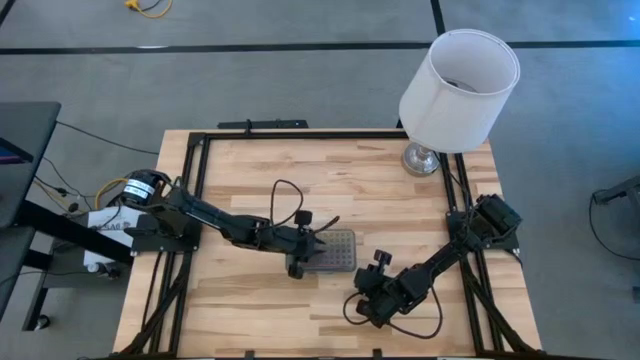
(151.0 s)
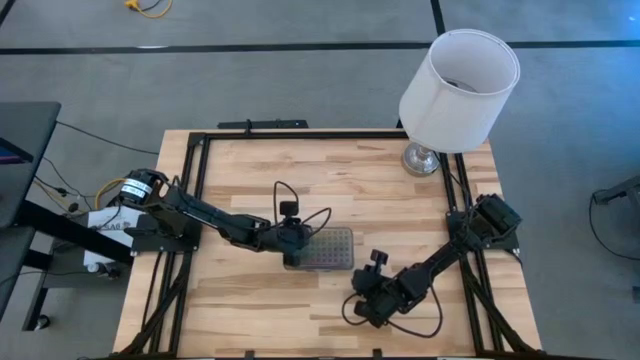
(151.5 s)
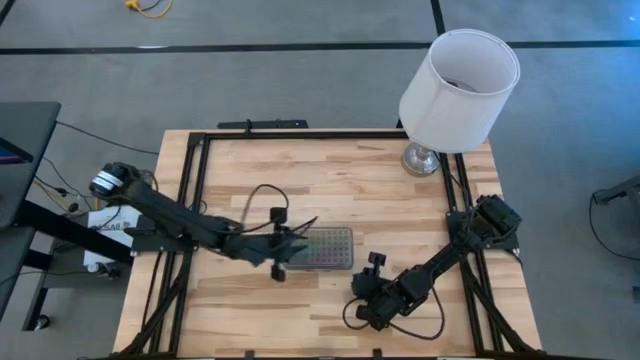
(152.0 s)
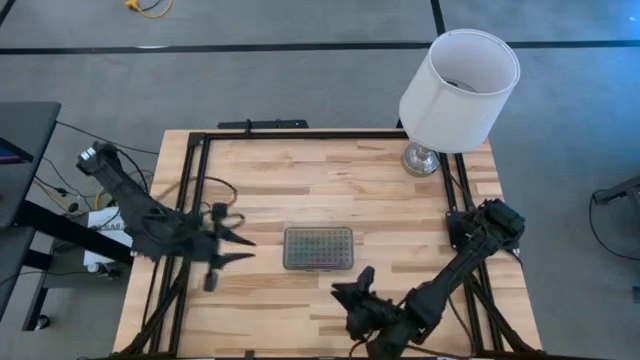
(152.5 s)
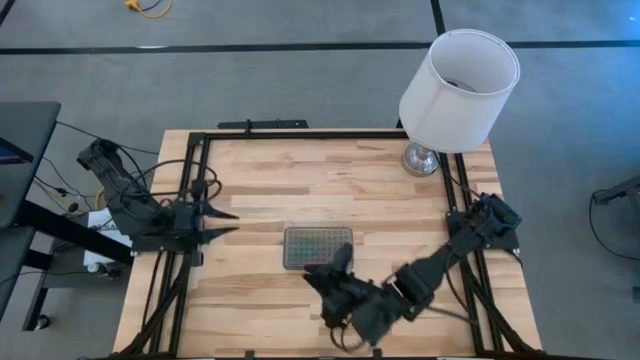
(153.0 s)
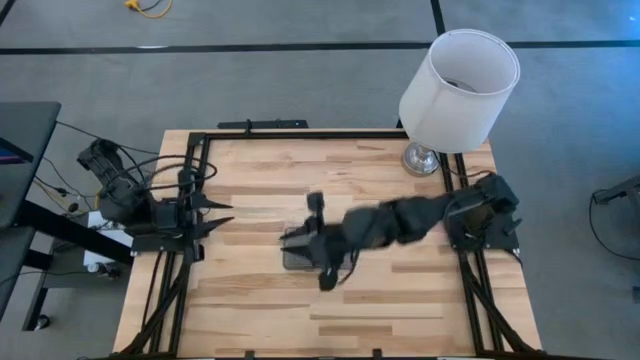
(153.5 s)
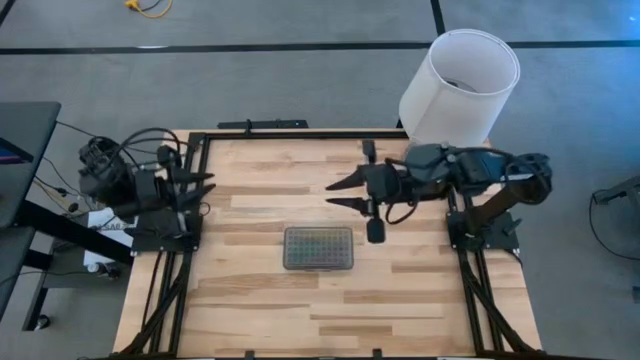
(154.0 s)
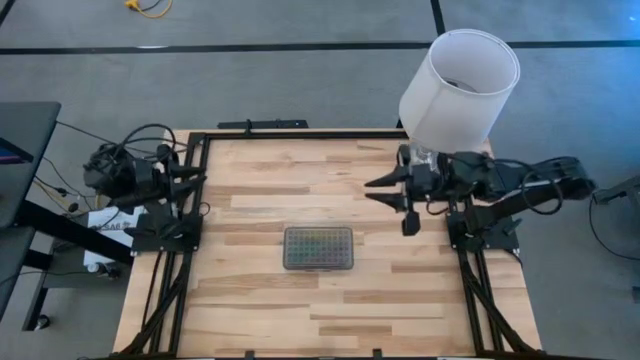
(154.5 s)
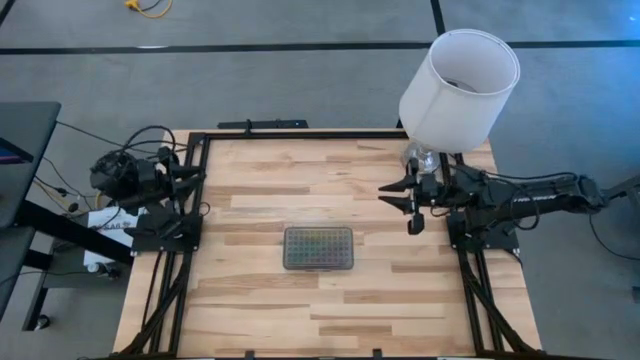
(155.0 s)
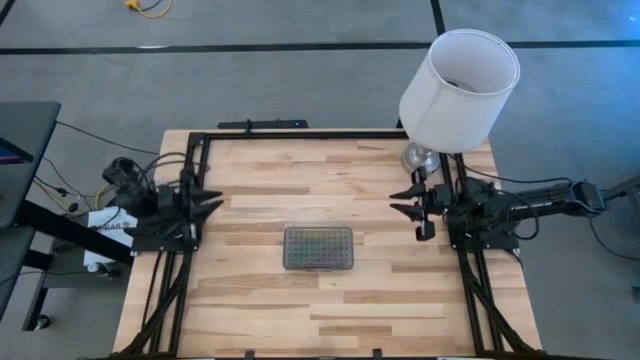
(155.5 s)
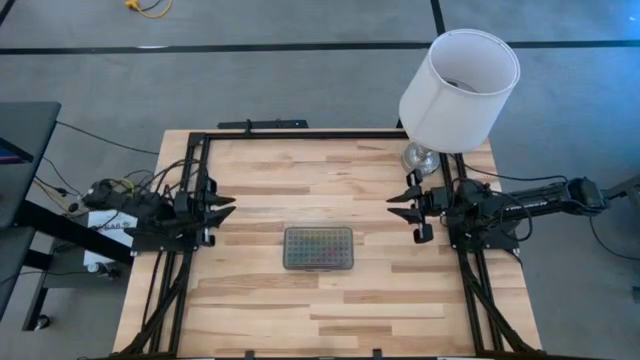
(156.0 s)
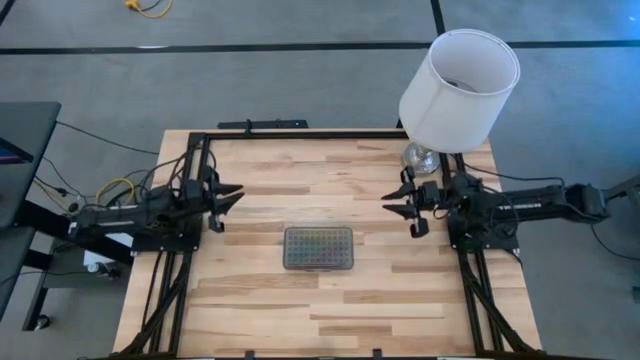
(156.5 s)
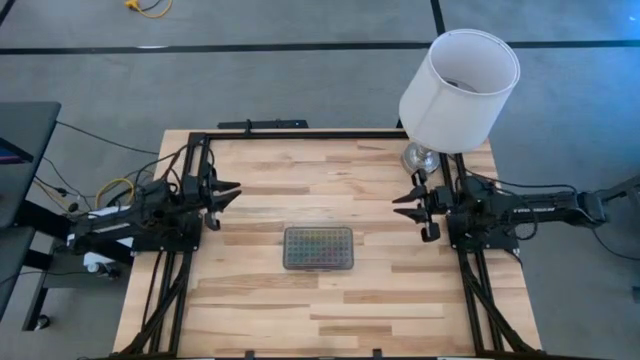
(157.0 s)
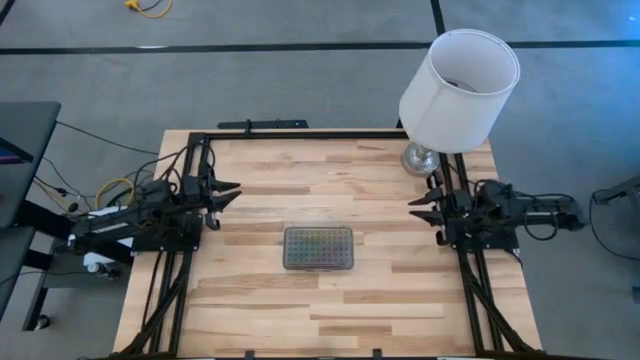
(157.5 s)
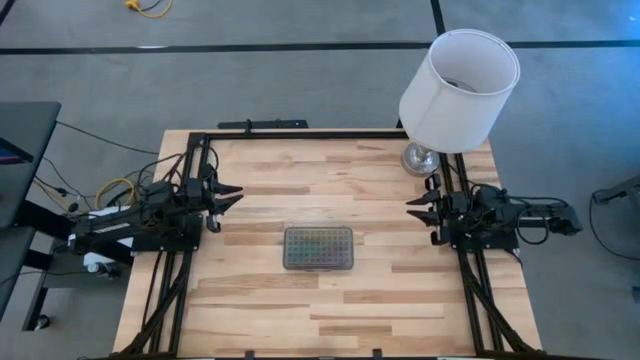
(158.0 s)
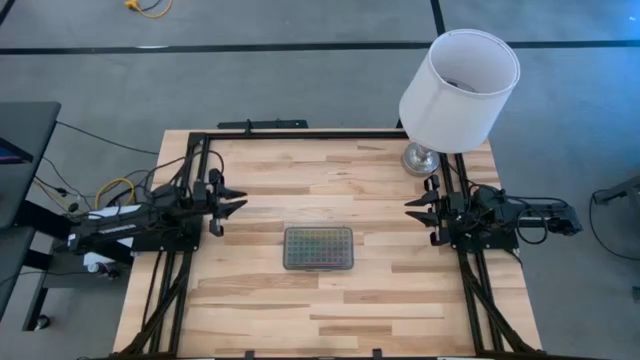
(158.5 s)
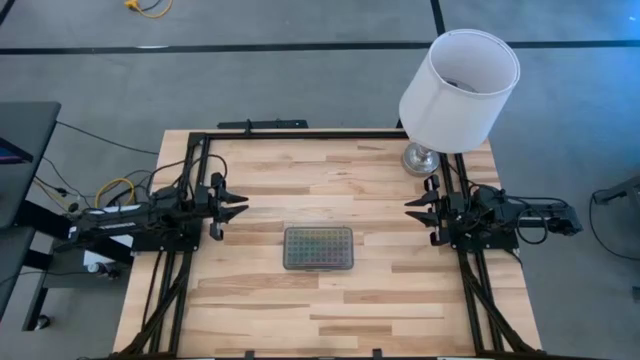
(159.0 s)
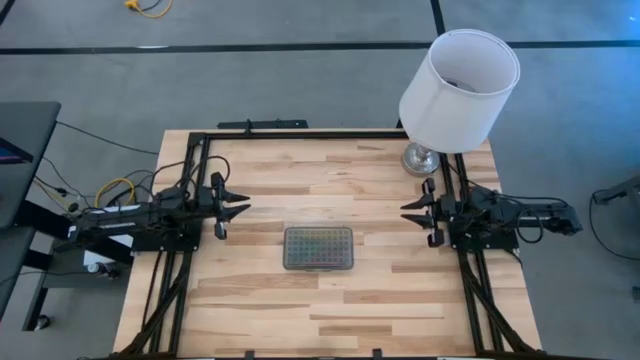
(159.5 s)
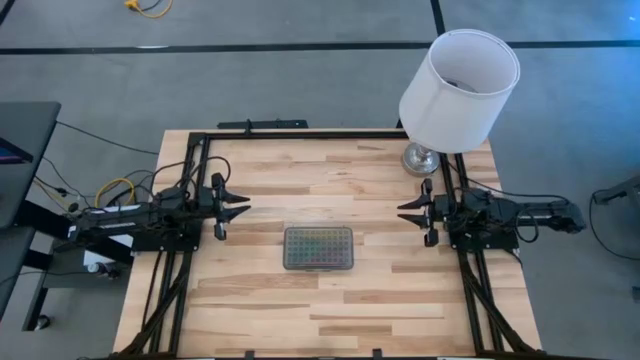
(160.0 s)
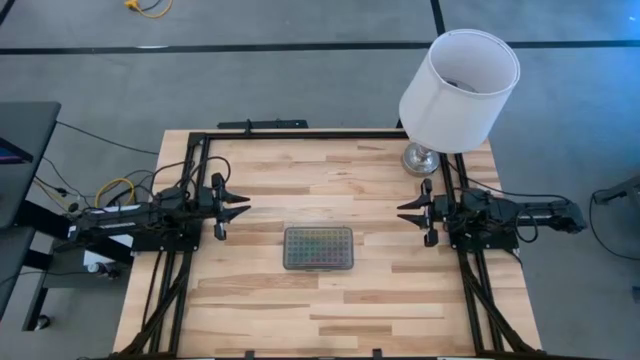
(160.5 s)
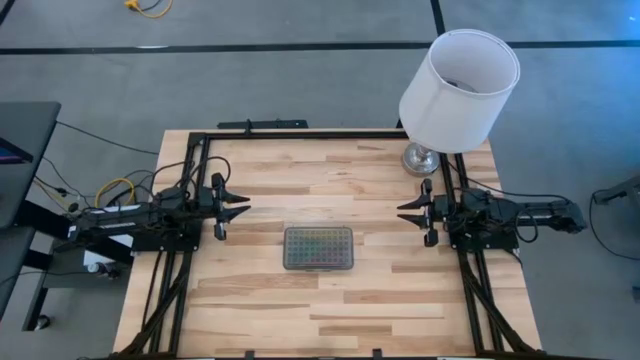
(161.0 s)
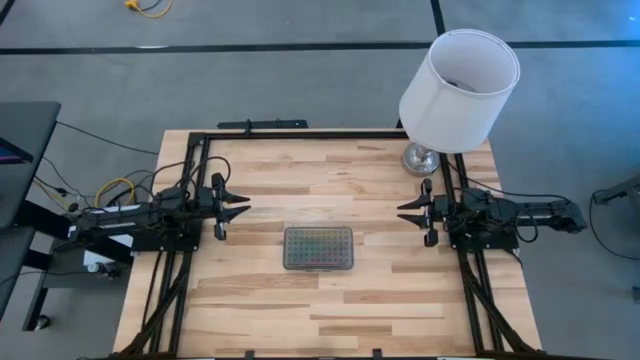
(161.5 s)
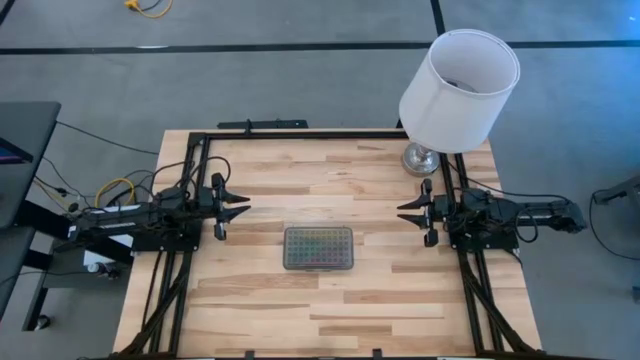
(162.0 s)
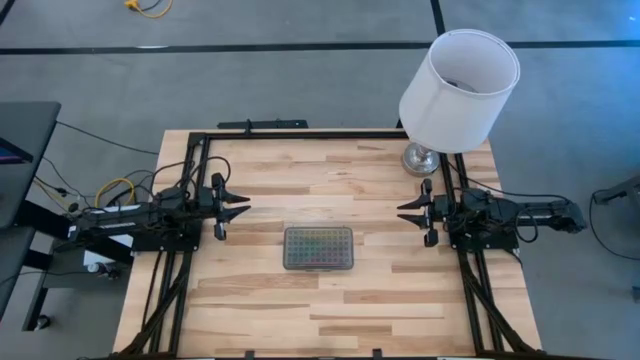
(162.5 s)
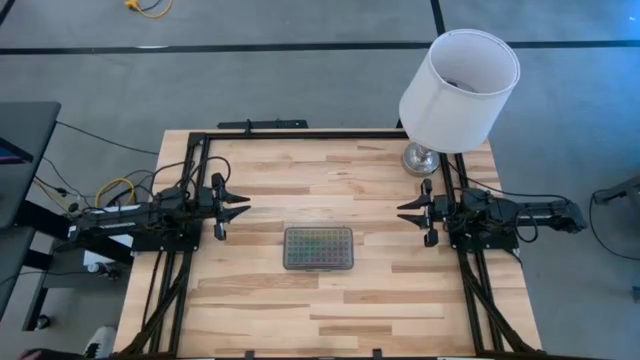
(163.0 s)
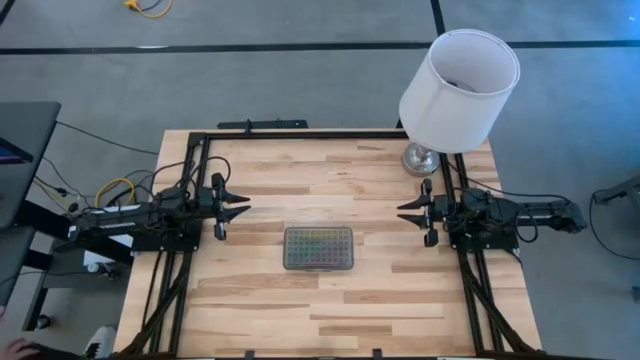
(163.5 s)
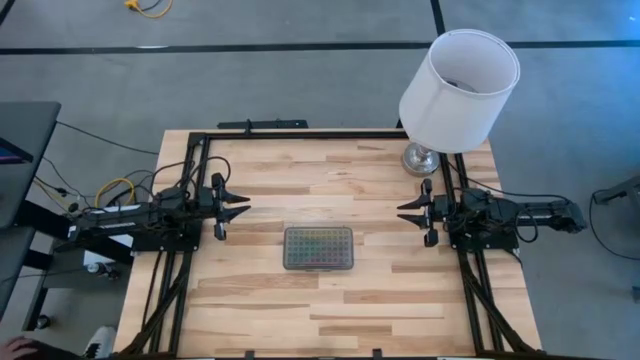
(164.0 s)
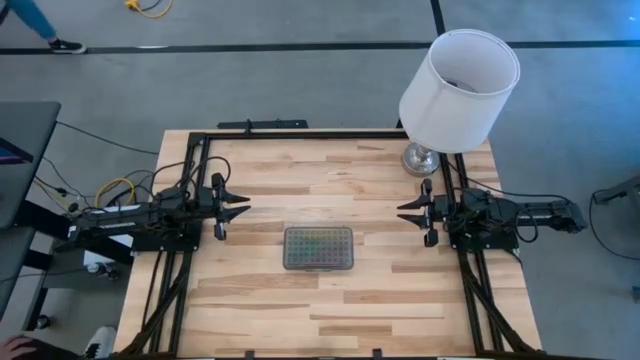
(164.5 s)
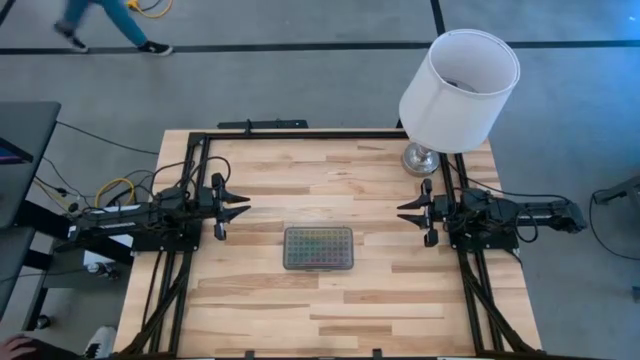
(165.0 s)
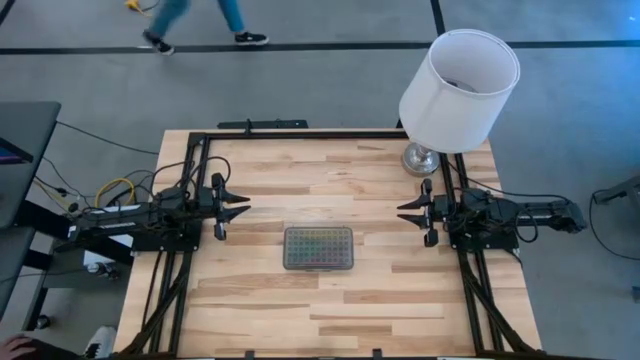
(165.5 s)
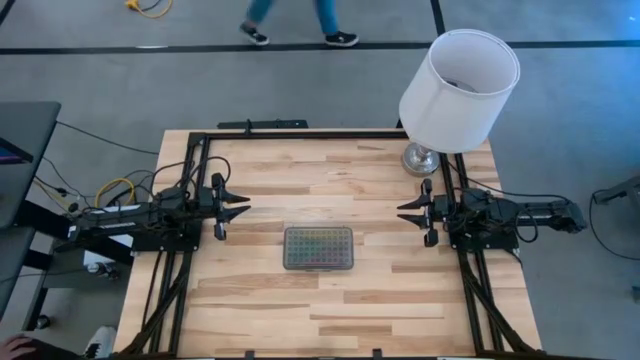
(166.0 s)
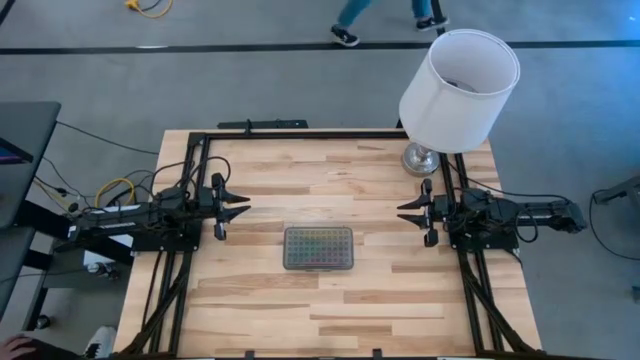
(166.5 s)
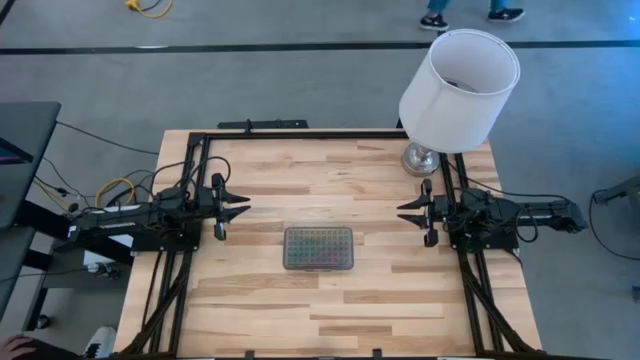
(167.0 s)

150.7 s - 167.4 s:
Task: Pick & place school supplies into a supply box
Return to Home Position

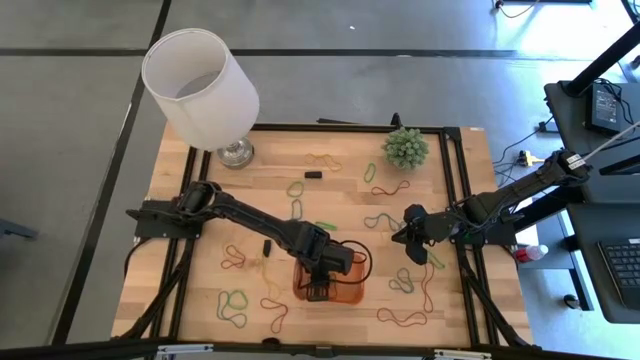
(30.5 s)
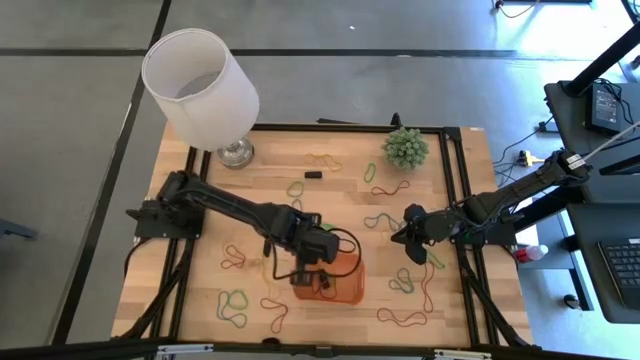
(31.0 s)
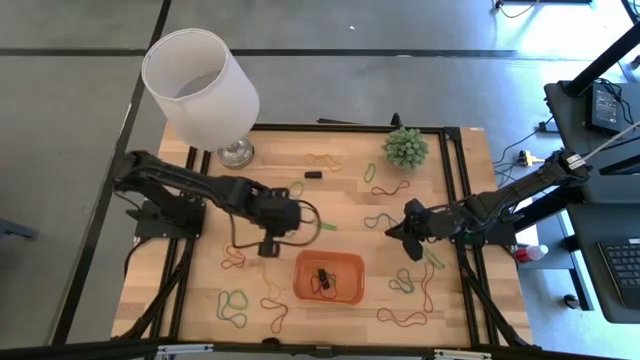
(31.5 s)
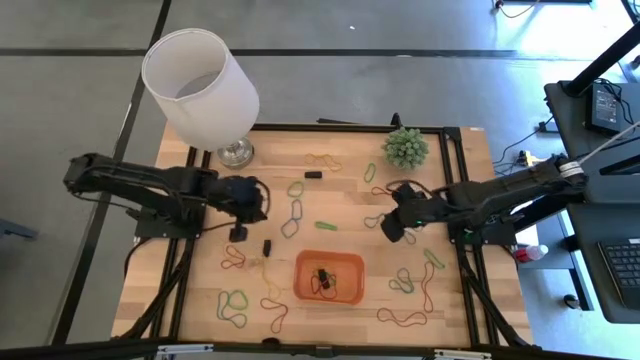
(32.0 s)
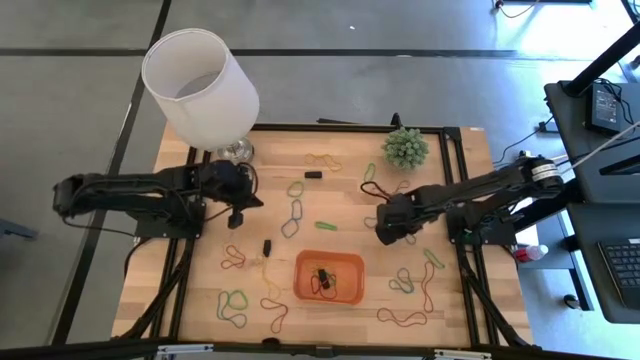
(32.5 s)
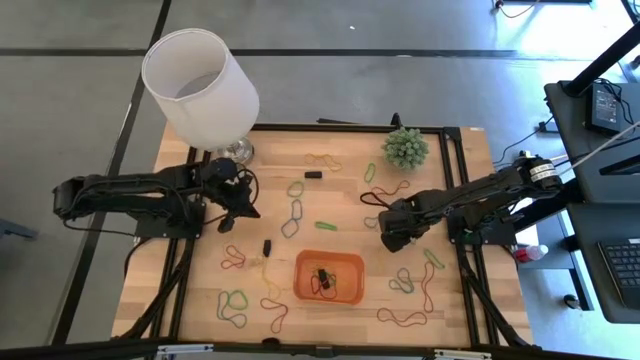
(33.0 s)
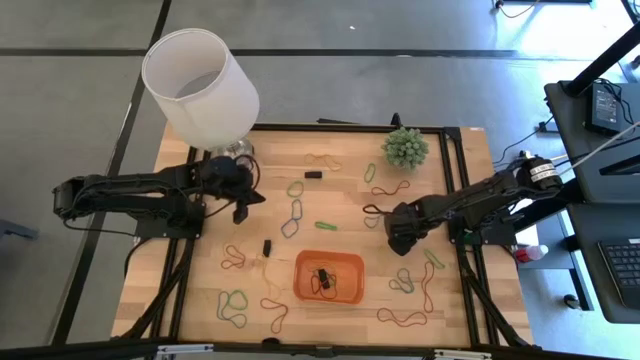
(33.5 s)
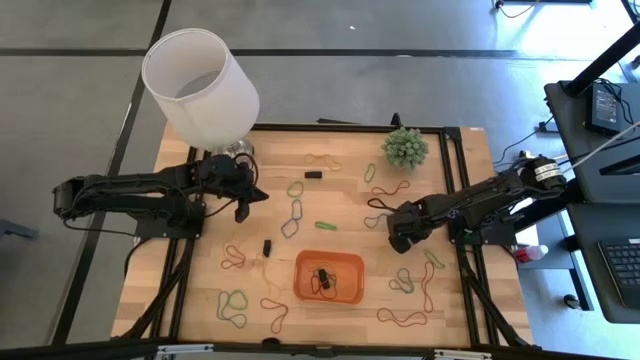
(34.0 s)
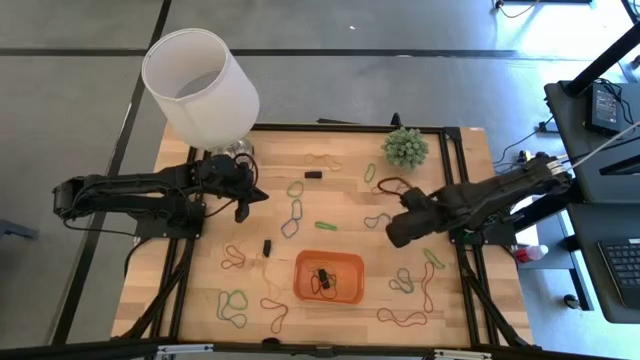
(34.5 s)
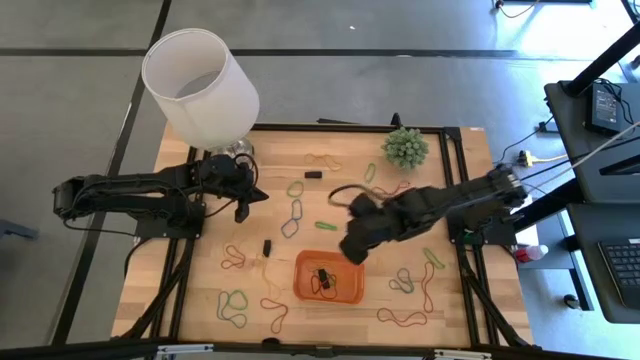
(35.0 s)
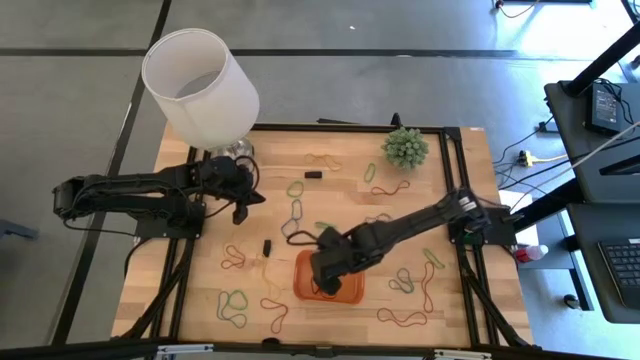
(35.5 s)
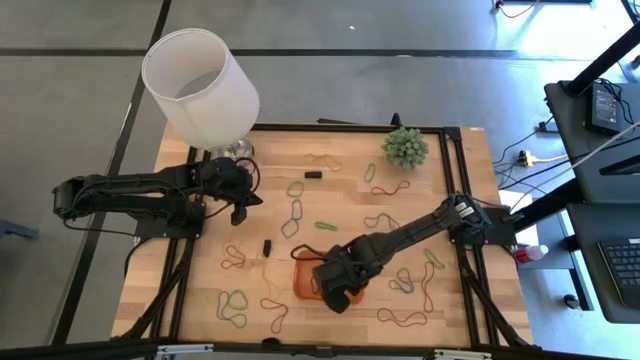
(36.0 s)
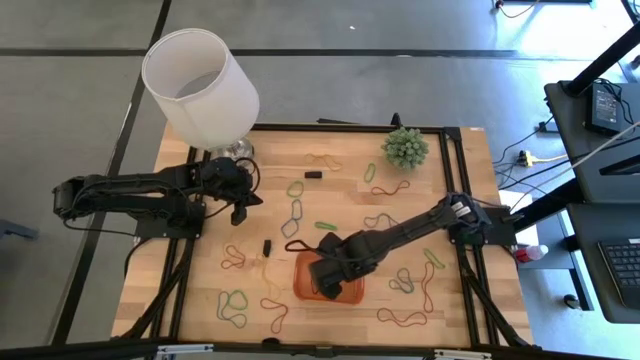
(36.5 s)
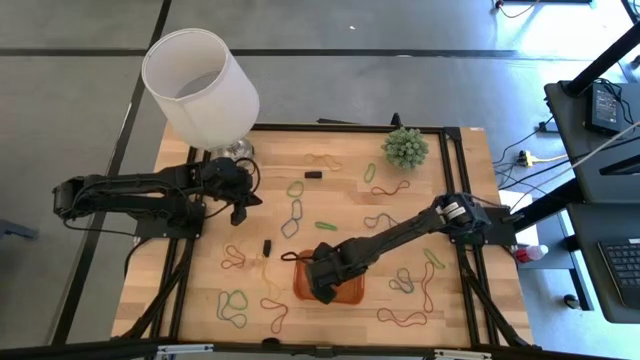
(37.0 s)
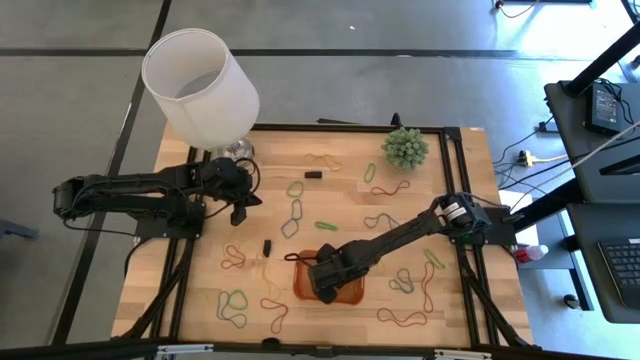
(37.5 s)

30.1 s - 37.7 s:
Task: Pick and place rubber bands into bin
Put the blue rubber band into the orange bin
